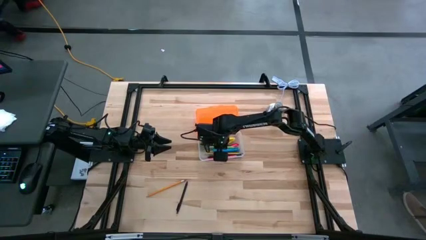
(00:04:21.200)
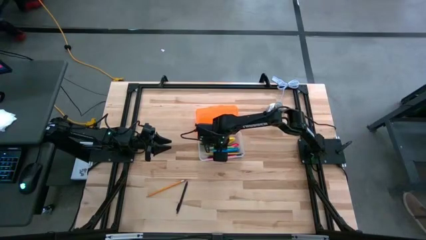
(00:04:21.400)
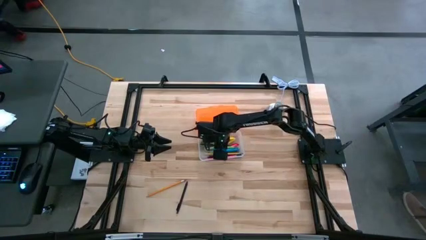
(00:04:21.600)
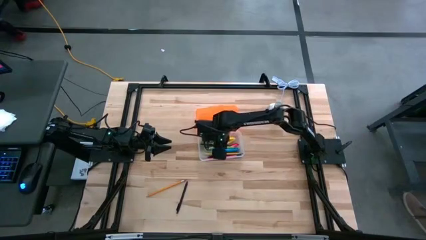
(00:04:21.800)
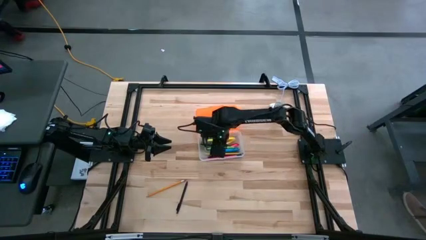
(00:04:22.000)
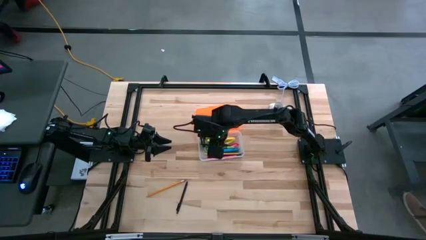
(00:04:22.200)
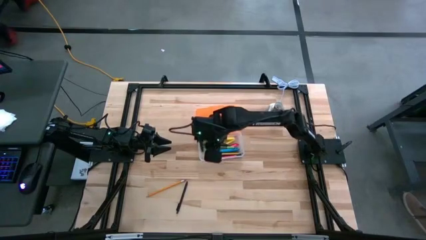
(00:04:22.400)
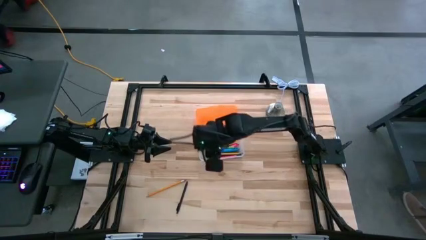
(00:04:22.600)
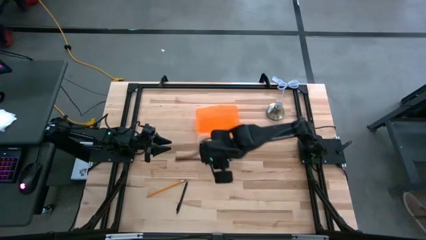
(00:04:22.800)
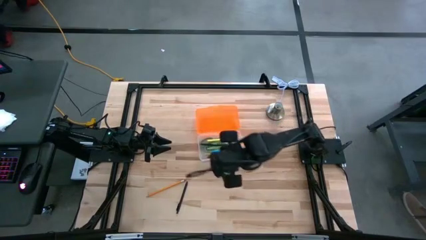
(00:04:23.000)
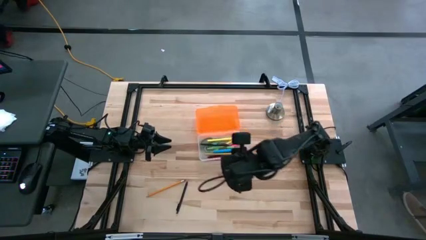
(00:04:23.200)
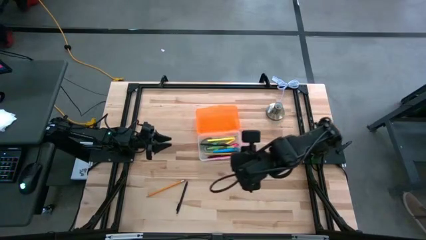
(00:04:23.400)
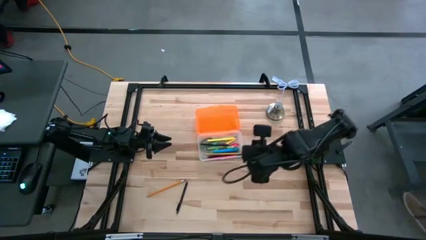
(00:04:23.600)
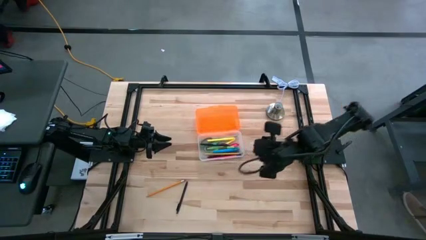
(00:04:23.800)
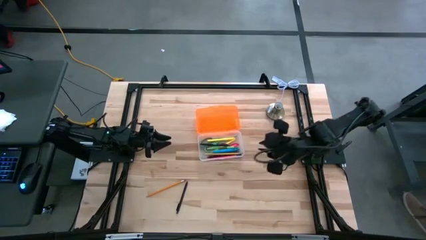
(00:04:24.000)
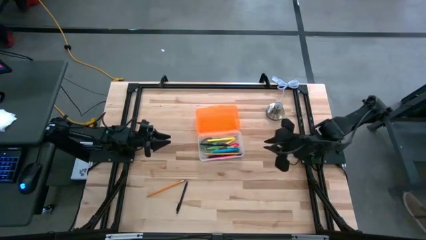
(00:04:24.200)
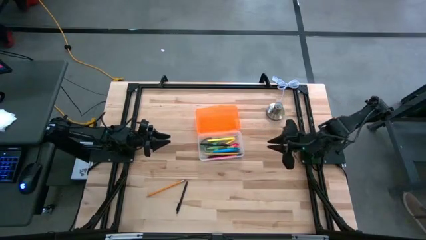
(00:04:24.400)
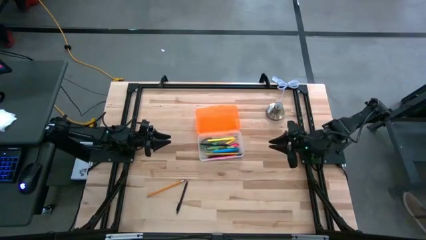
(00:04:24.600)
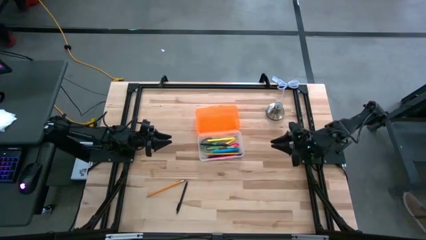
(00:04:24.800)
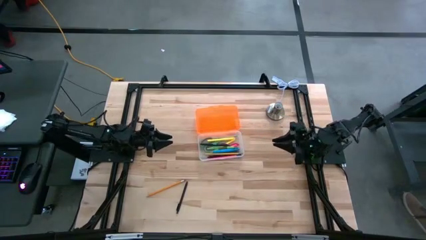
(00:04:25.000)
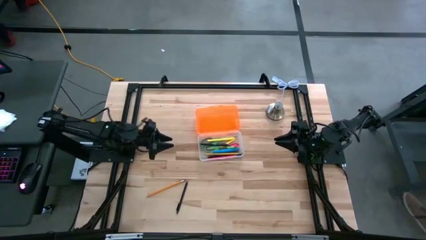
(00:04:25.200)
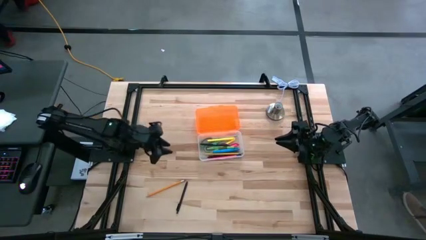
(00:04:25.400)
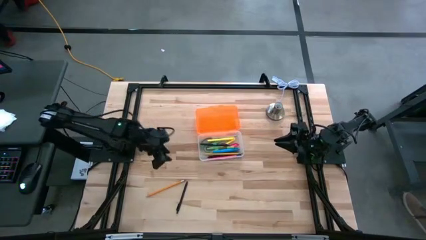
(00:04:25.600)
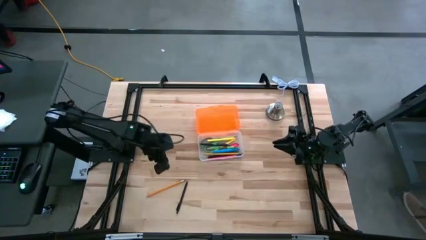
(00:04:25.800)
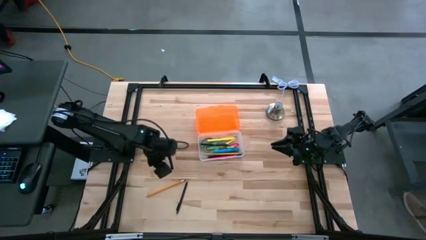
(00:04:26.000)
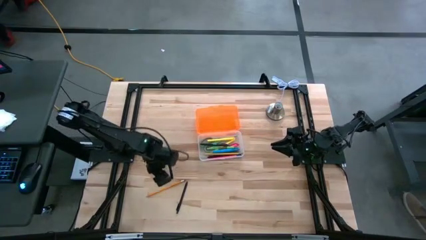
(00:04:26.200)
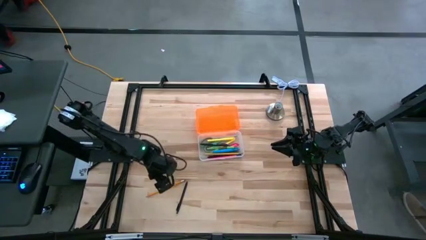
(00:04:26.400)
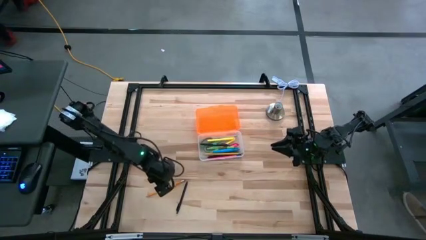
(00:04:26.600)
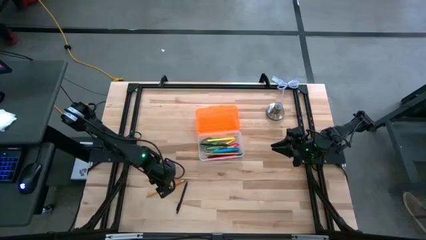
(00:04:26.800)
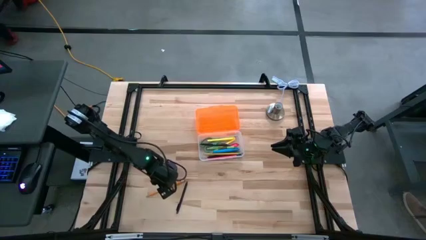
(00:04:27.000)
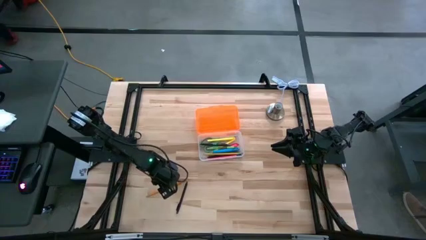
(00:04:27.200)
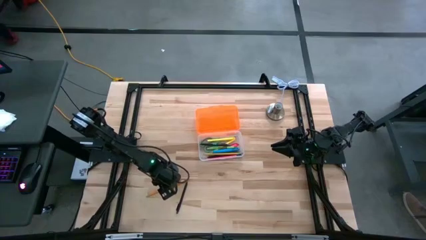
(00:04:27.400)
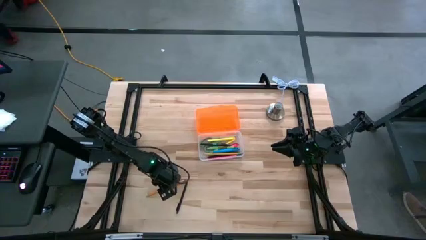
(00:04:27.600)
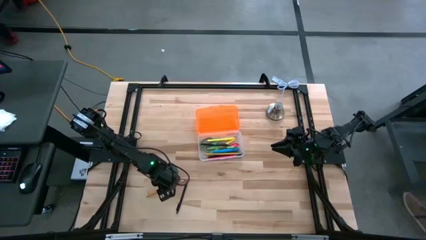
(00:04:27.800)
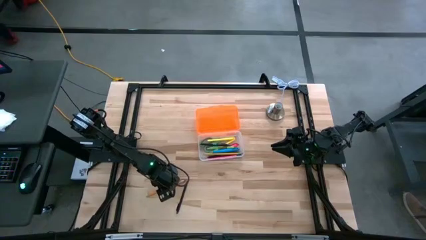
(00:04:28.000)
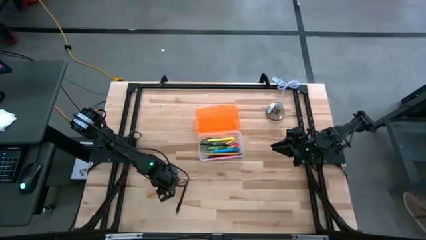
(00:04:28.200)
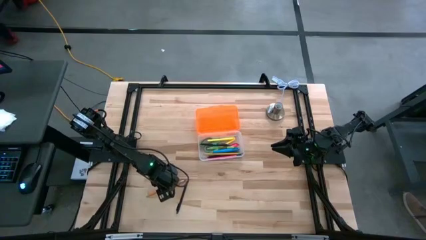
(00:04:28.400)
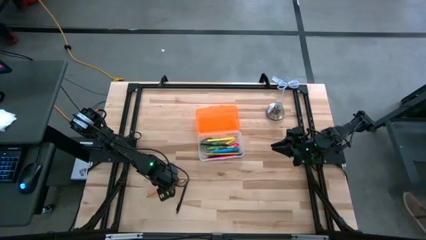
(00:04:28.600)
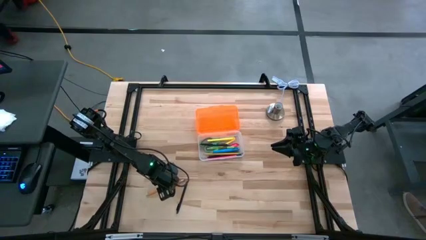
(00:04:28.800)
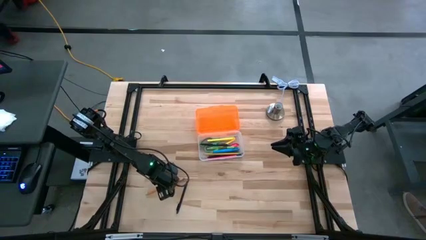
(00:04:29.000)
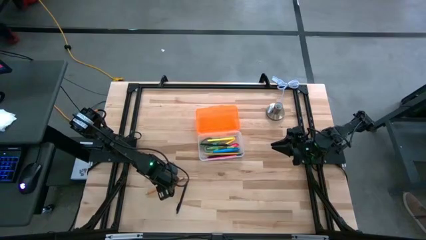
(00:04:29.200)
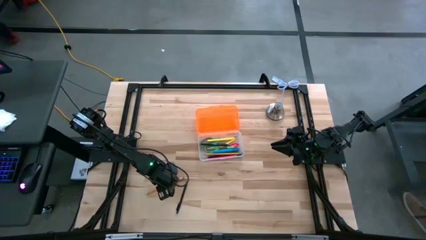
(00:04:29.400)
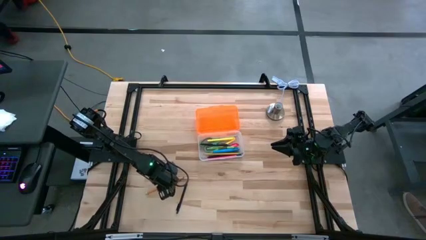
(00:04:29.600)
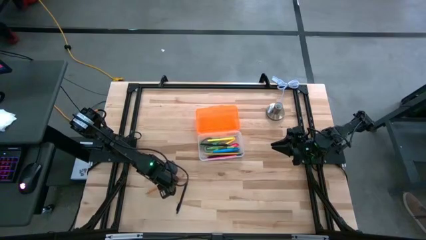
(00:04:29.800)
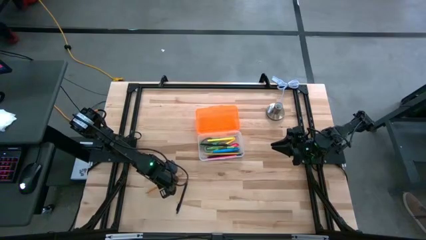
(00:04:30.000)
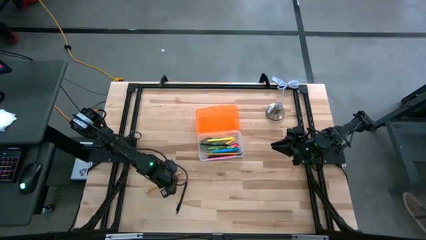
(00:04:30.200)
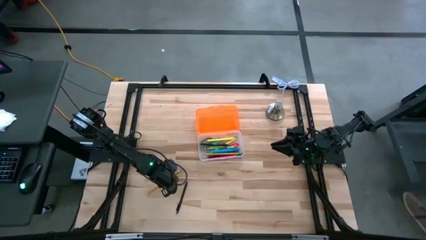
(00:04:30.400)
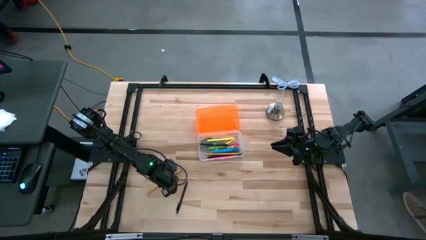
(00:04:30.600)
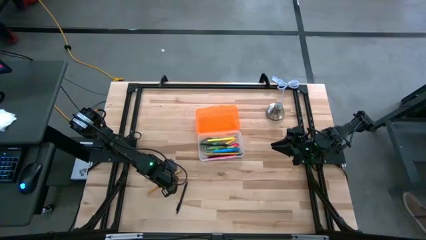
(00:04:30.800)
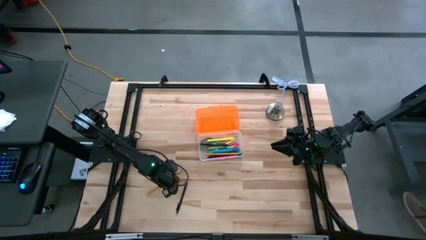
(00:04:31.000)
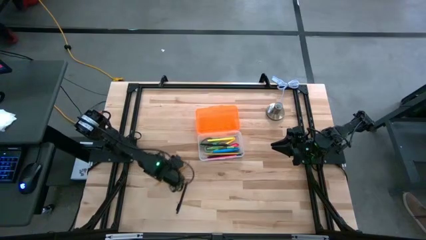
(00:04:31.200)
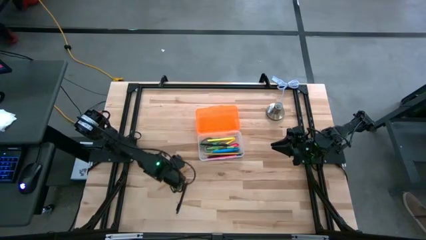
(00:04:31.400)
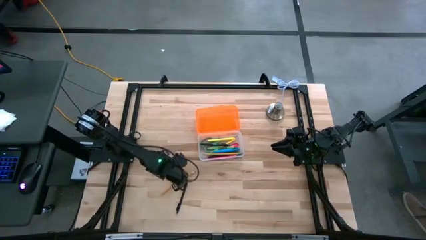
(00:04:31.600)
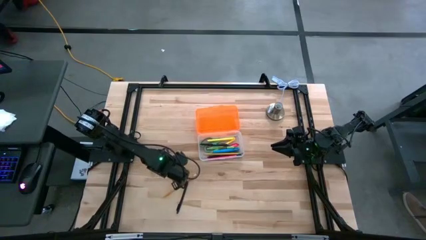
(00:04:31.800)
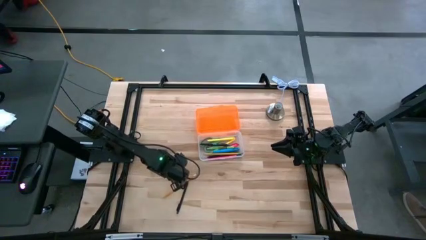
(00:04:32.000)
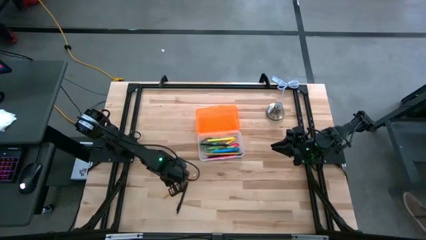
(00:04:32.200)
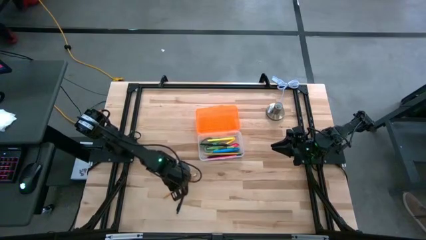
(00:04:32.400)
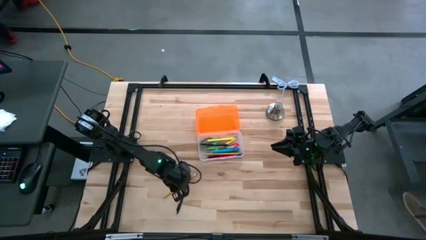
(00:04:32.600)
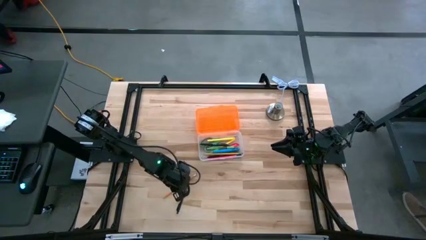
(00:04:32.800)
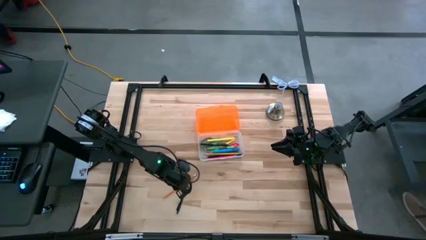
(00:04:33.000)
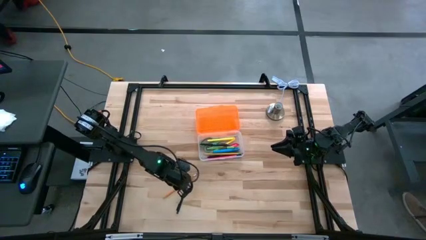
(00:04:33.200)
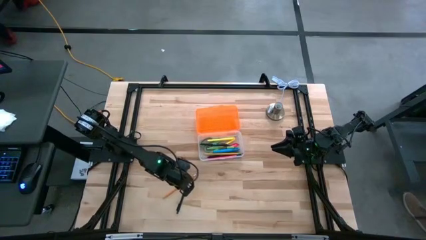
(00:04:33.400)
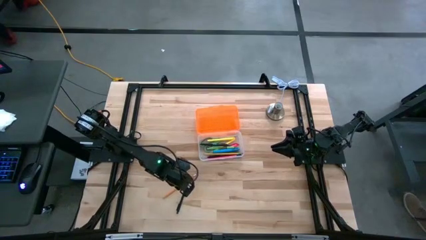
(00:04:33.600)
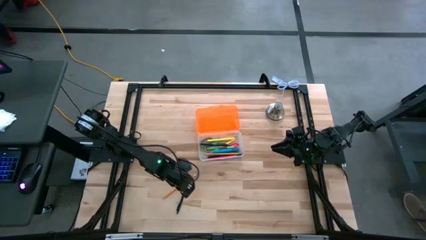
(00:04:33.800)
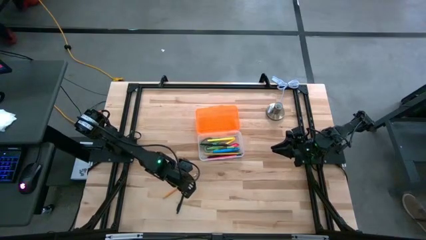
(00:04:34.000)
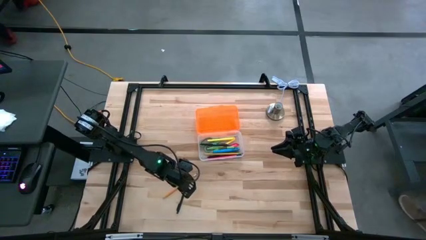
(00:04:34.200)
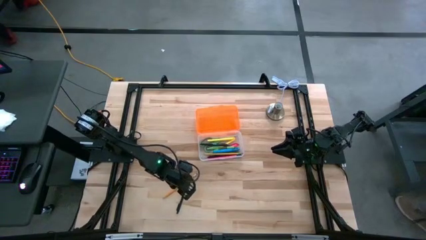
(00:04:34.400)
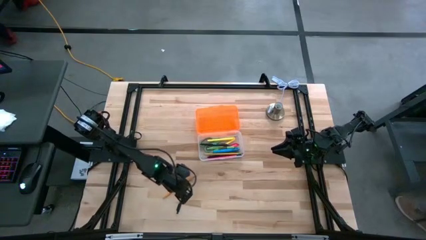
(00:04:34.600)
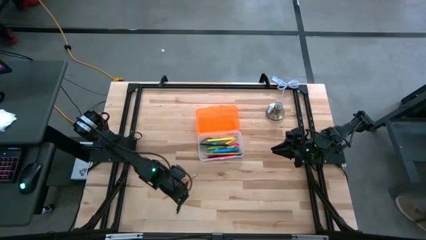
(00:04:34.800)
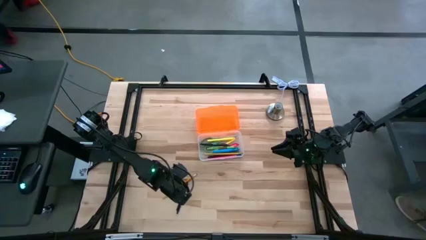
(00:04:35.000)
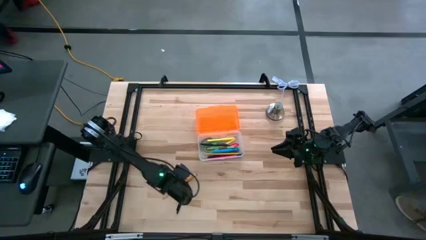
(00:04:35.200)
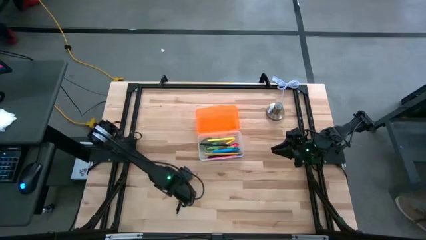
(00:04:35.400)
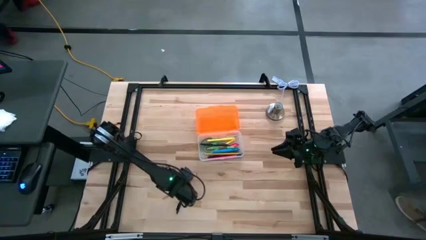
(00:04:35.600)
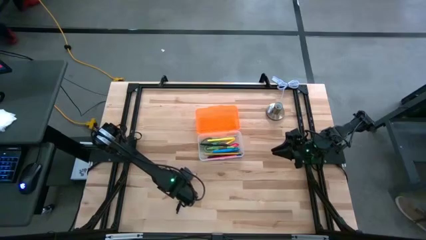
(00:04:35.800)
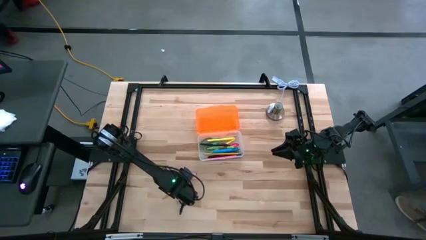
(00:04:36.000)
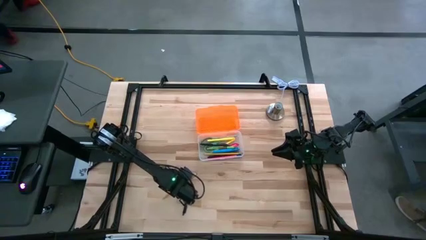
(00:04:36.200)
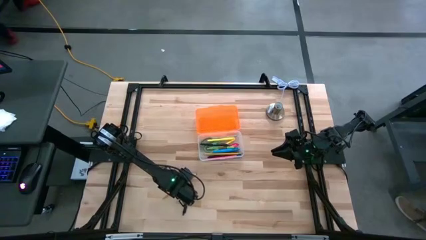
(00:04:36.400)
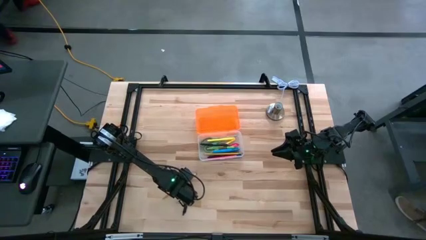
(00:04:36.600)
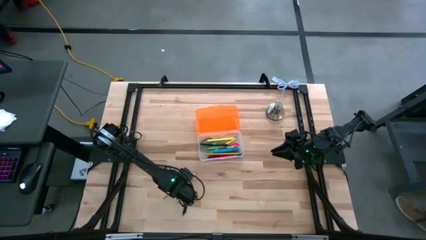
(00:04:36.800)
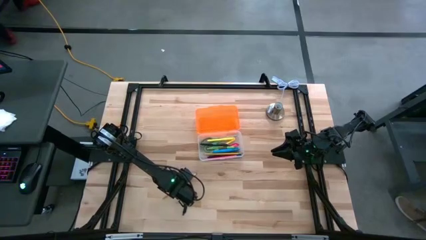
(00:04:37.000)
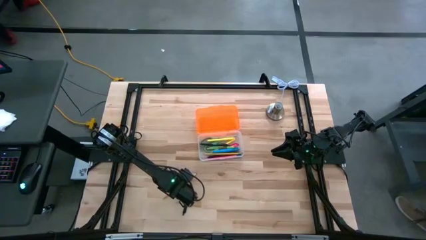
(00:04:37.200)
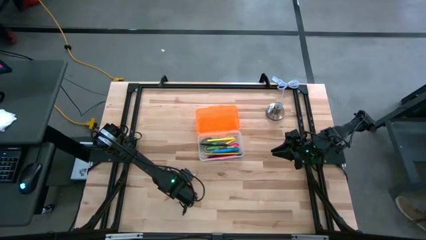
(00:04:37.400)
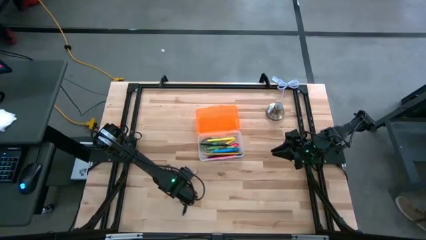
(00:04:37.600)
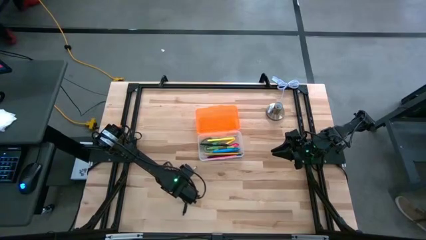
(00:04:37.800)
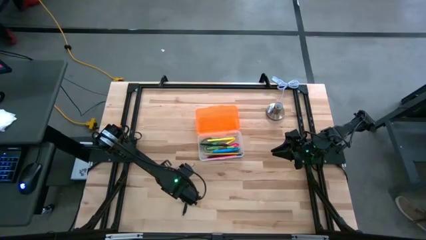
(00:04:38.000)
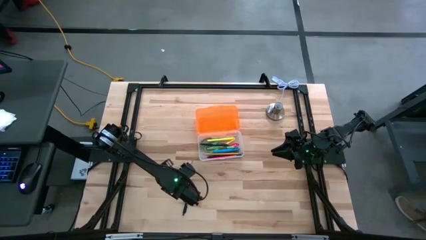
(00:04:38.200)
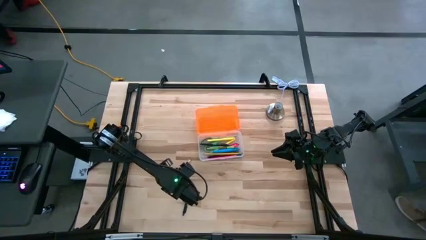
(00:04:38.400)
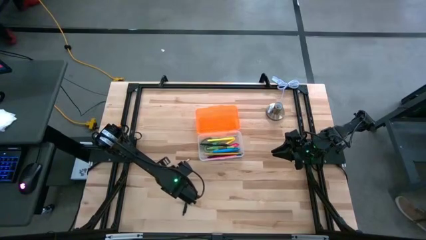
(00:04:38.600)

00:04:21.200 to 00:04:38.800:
Task: Pick & place school supplies into a supply box
Put the yellow pen into the container
